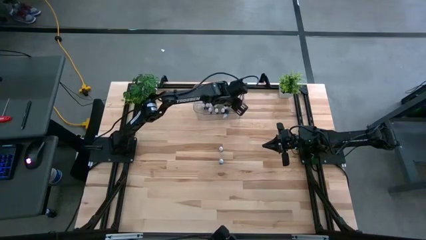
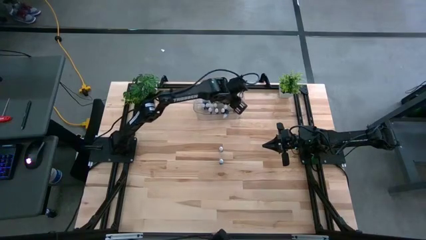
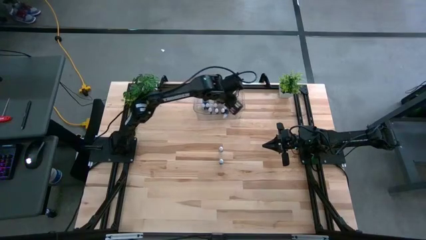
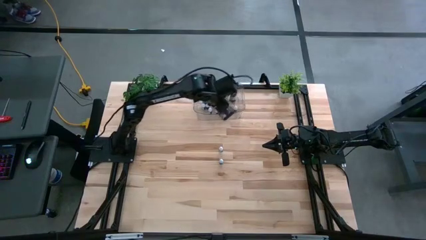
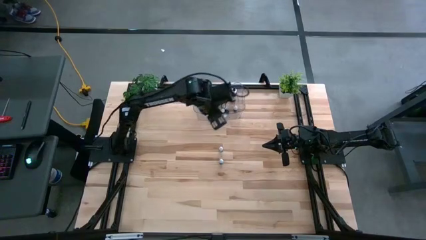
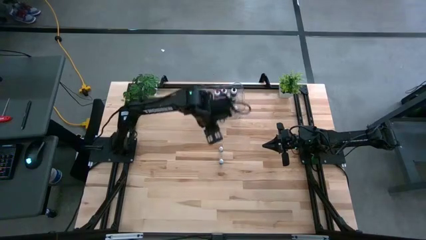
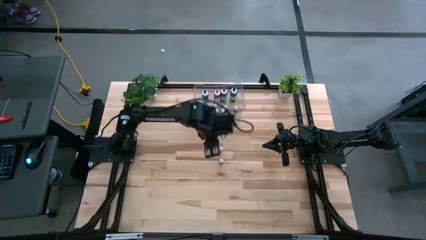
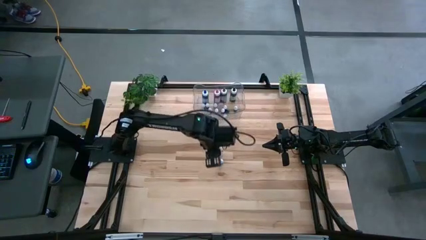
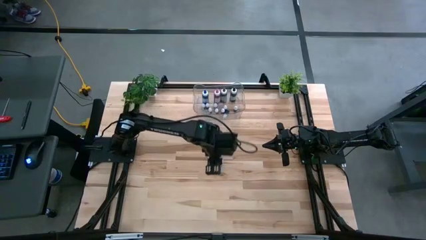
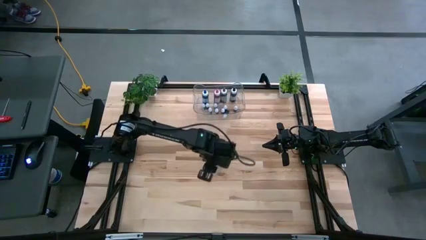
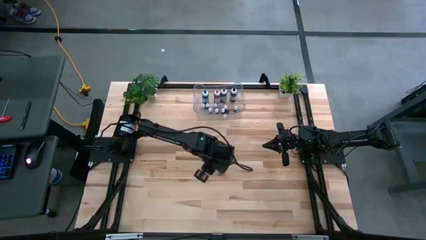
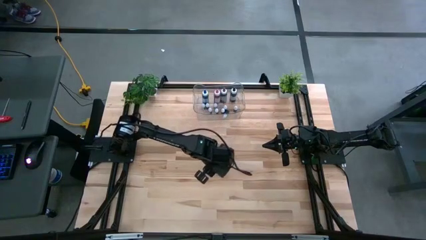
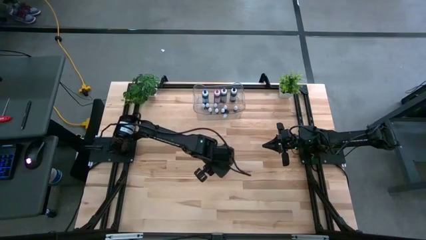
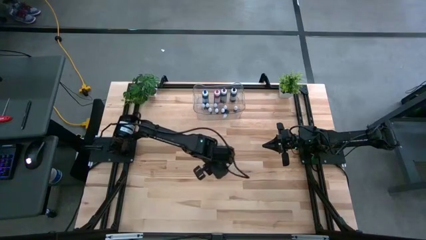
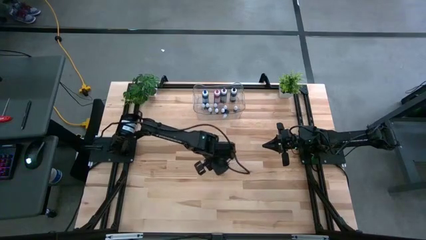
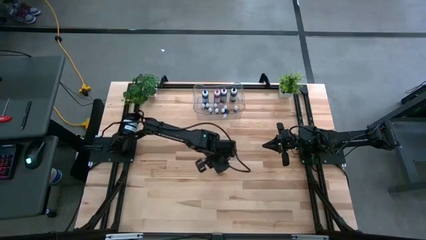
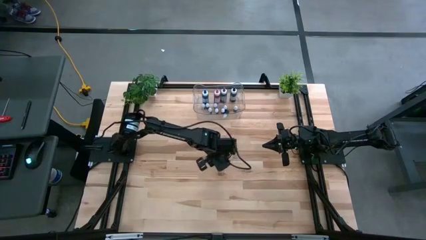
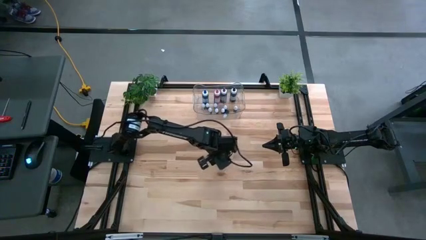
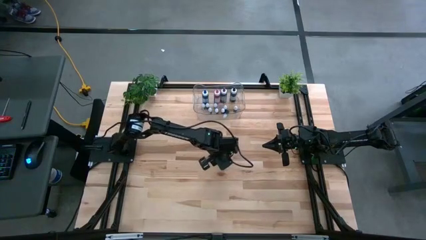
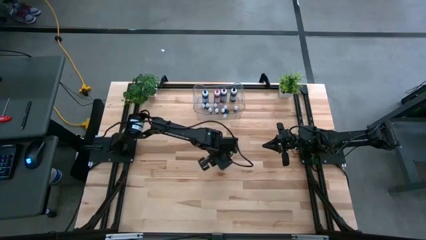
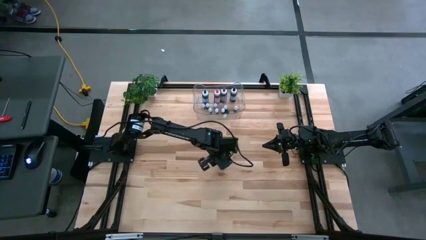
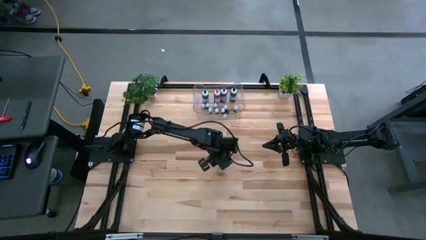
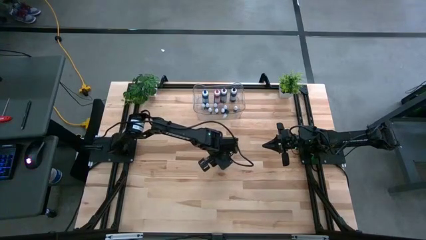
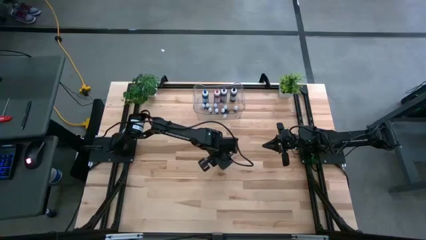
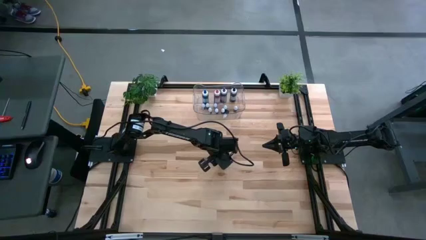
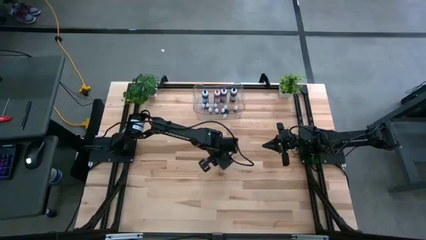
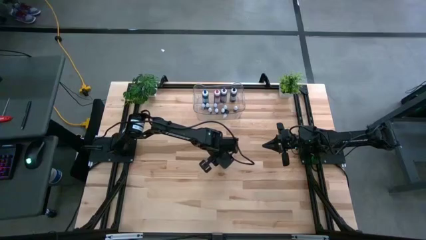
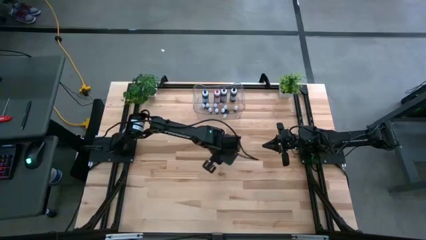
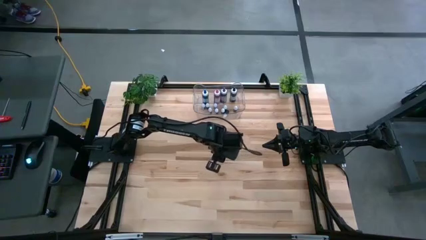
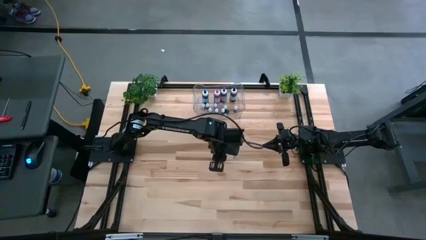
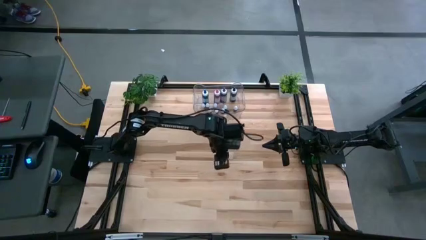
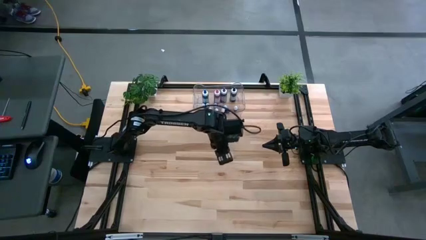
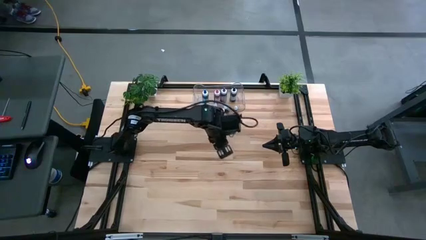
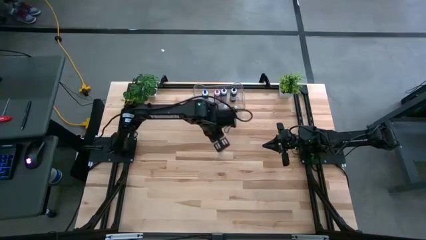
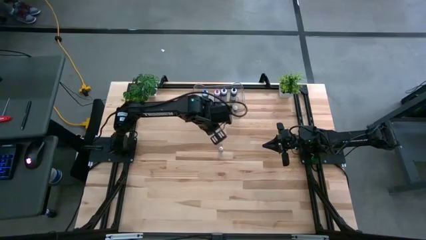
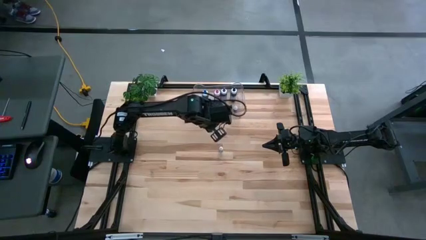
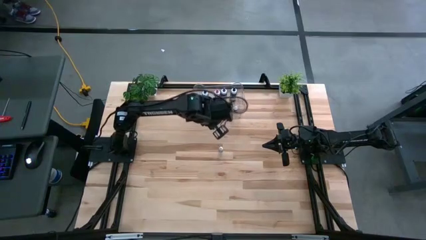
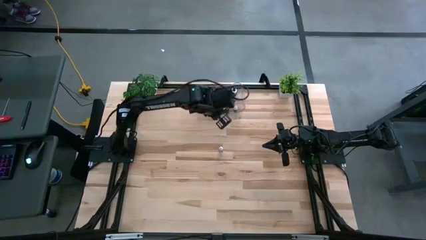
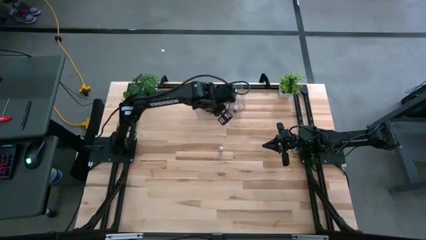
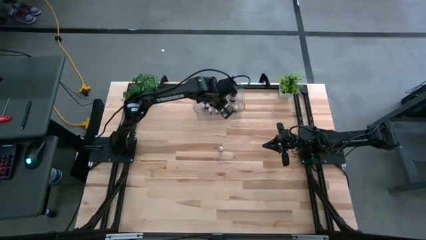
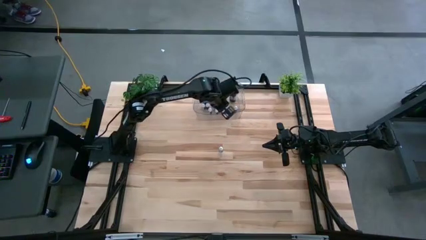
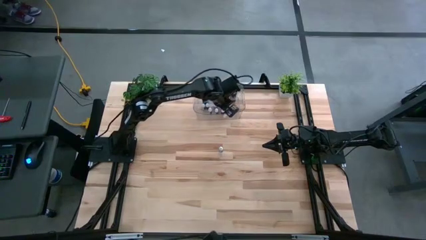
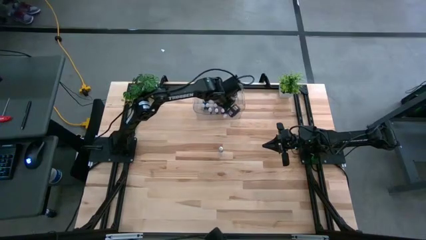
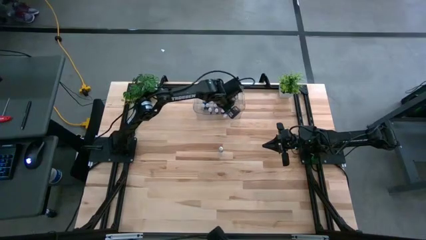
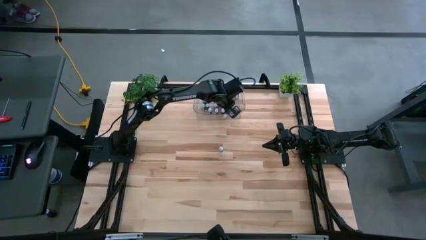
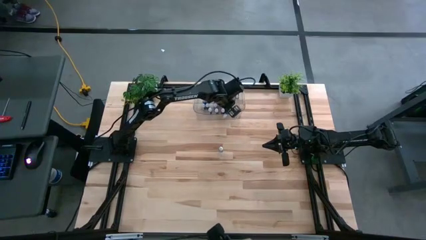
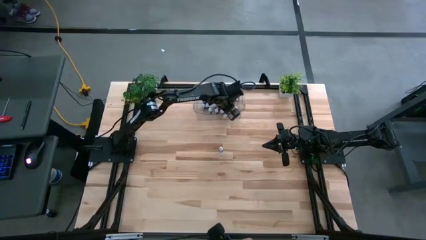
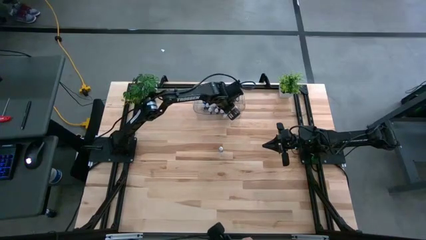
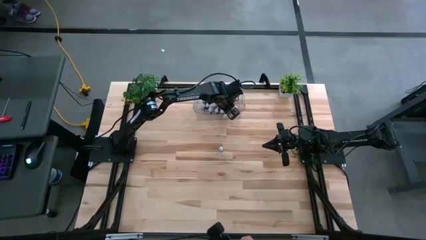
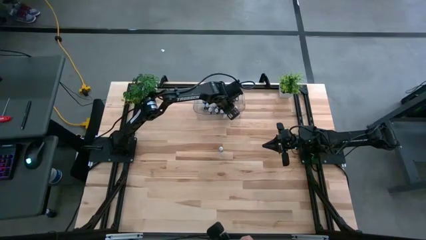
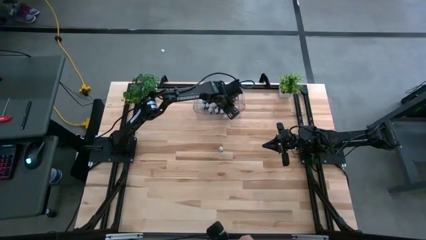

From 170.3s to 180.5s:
Task: Pick & Place food coloring
Put the small blue food coloring bottle into the transparent bin
